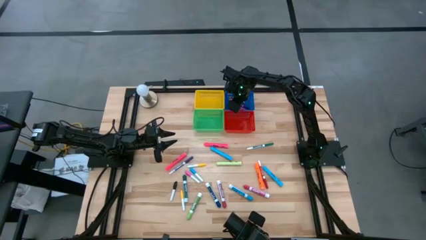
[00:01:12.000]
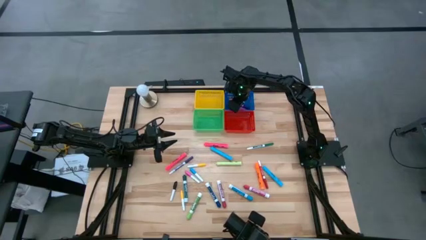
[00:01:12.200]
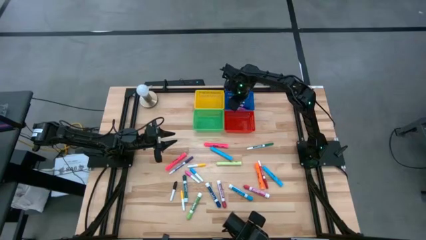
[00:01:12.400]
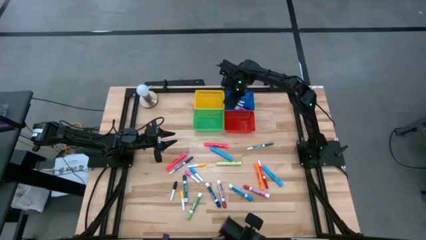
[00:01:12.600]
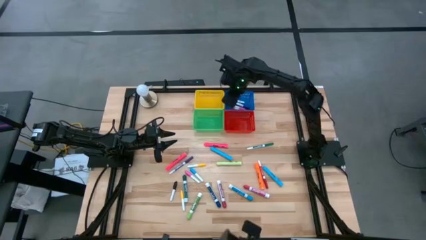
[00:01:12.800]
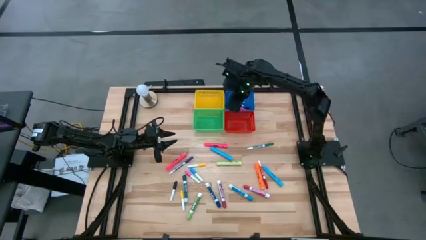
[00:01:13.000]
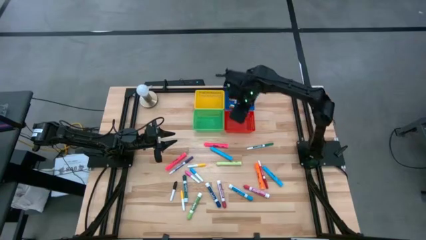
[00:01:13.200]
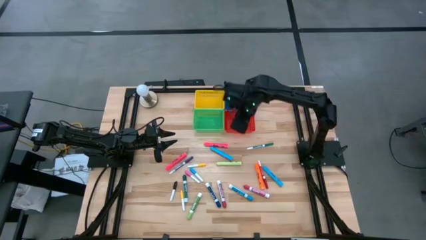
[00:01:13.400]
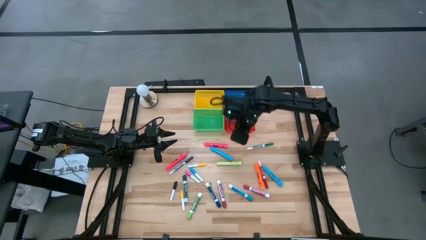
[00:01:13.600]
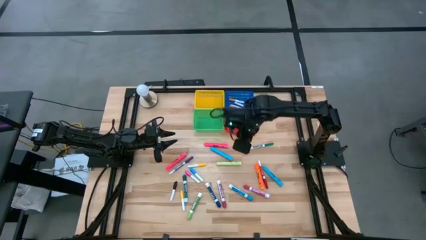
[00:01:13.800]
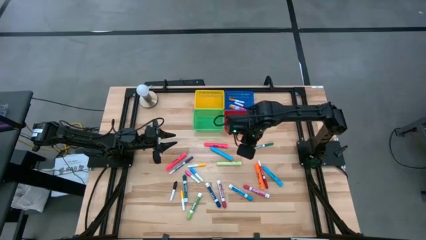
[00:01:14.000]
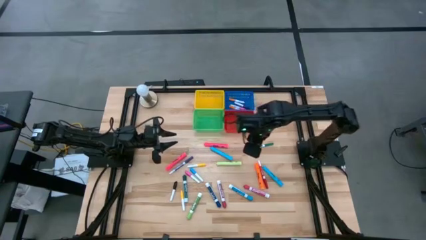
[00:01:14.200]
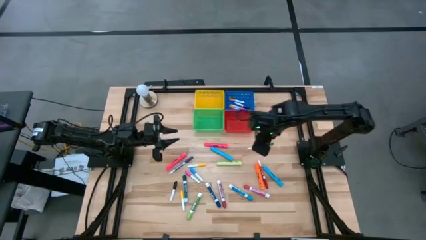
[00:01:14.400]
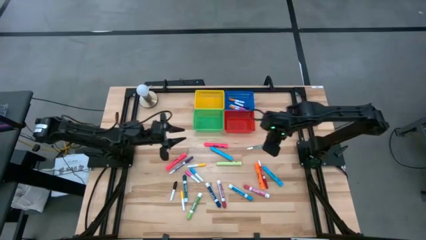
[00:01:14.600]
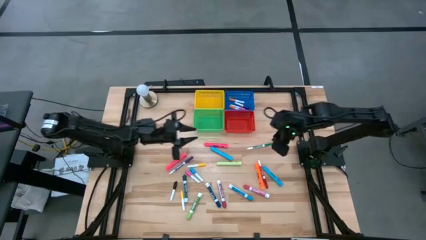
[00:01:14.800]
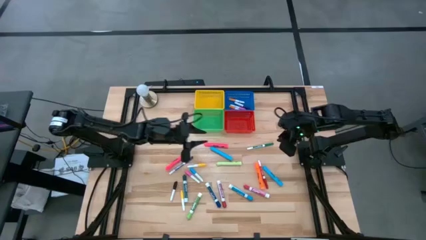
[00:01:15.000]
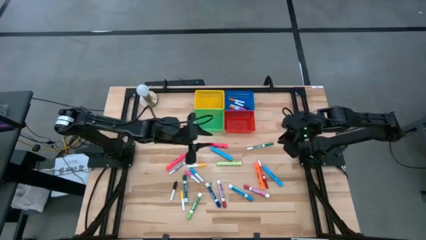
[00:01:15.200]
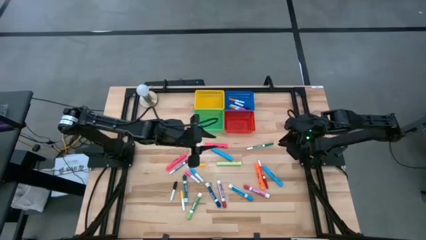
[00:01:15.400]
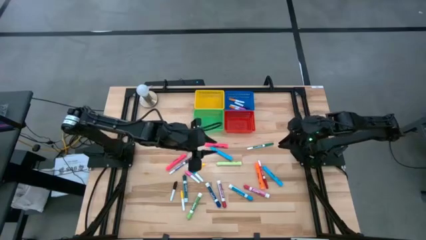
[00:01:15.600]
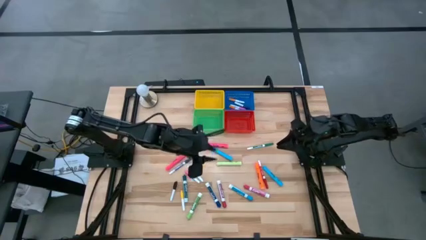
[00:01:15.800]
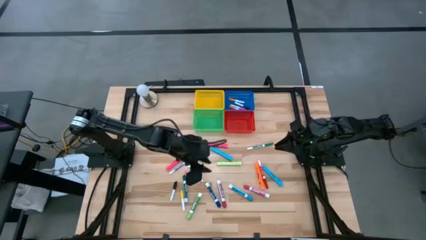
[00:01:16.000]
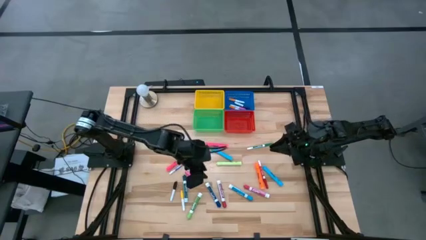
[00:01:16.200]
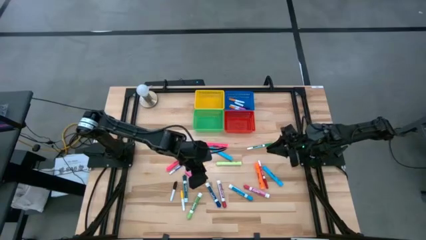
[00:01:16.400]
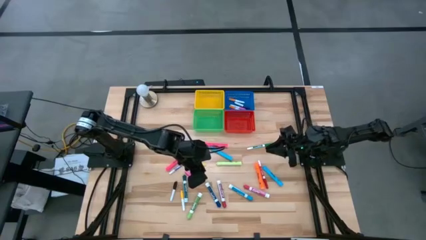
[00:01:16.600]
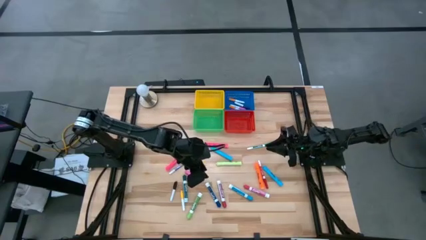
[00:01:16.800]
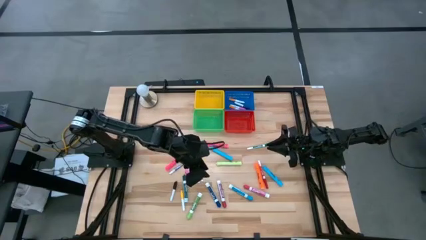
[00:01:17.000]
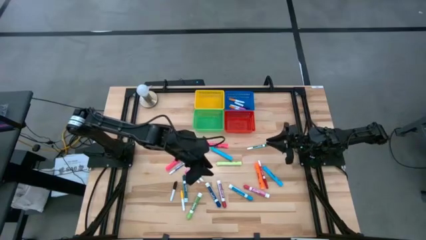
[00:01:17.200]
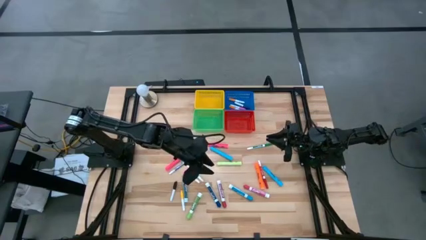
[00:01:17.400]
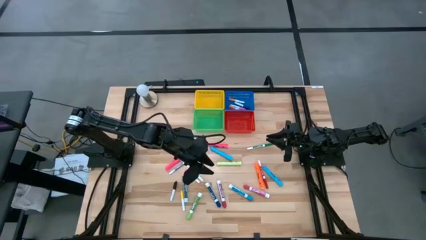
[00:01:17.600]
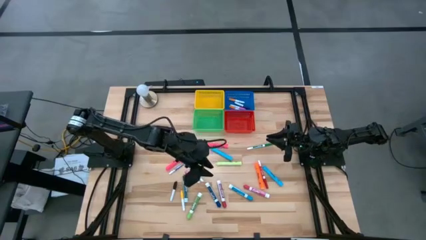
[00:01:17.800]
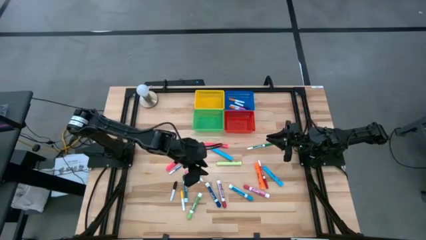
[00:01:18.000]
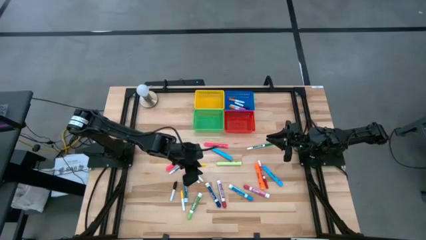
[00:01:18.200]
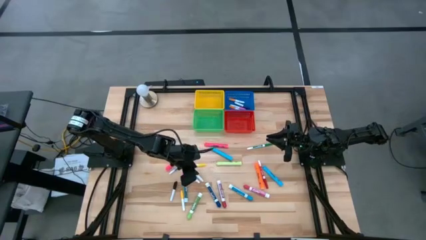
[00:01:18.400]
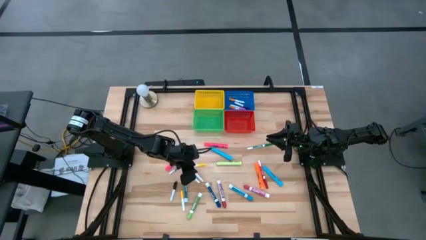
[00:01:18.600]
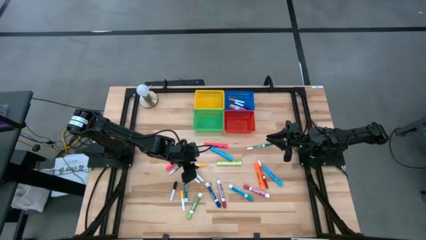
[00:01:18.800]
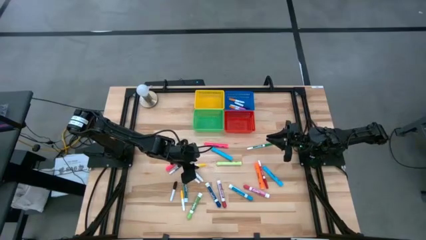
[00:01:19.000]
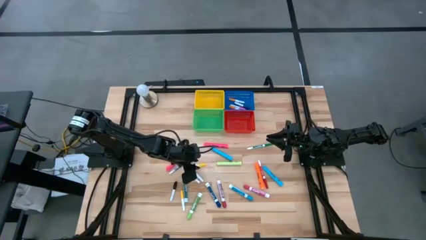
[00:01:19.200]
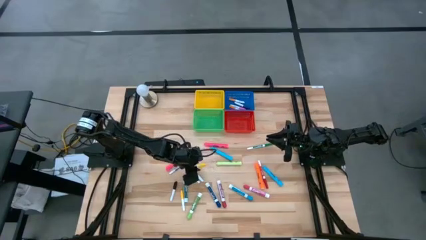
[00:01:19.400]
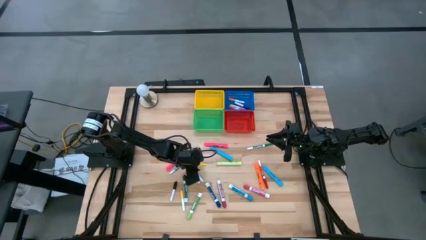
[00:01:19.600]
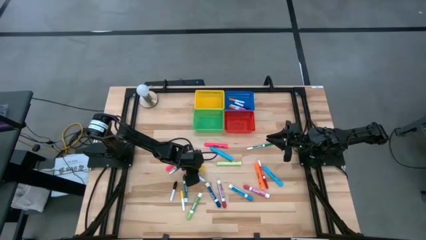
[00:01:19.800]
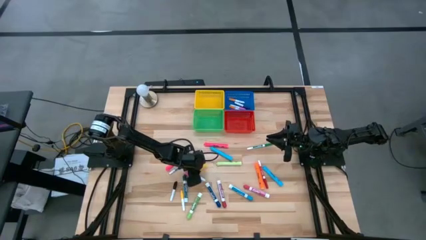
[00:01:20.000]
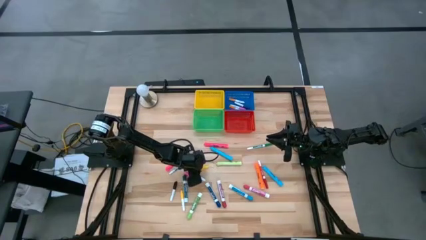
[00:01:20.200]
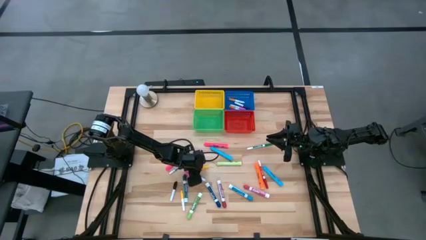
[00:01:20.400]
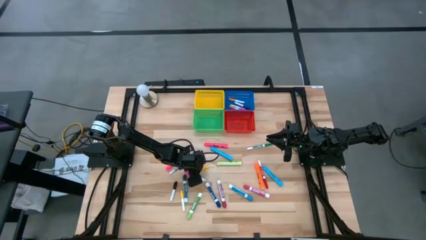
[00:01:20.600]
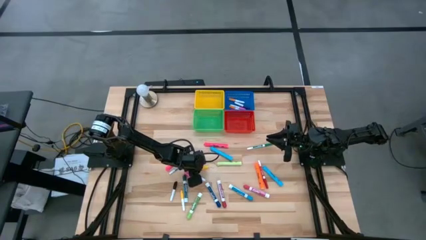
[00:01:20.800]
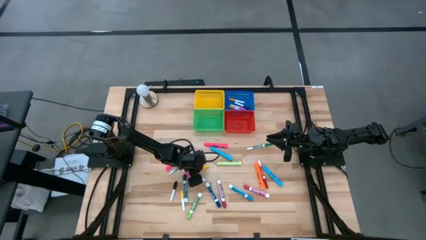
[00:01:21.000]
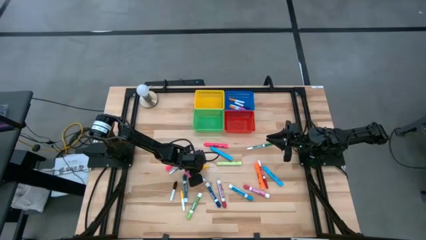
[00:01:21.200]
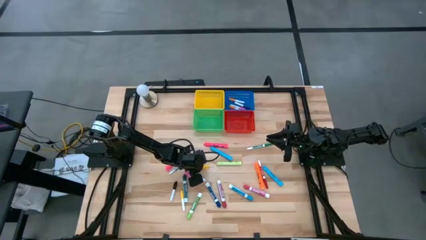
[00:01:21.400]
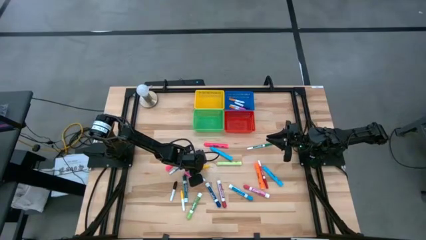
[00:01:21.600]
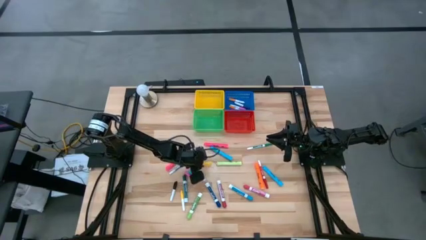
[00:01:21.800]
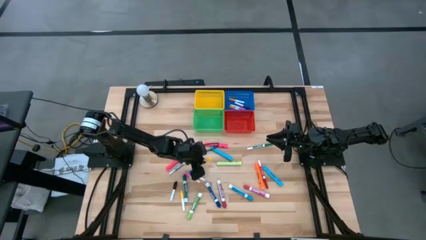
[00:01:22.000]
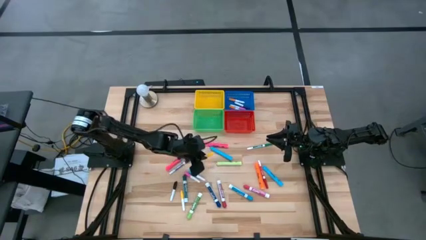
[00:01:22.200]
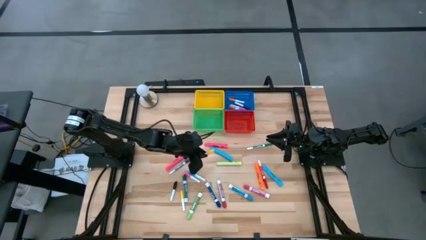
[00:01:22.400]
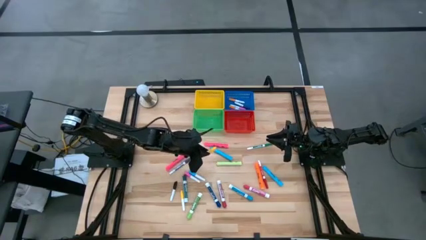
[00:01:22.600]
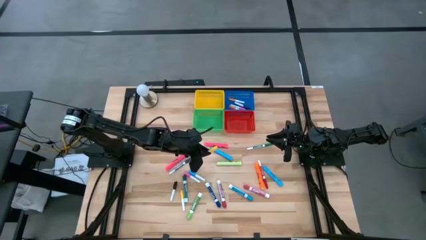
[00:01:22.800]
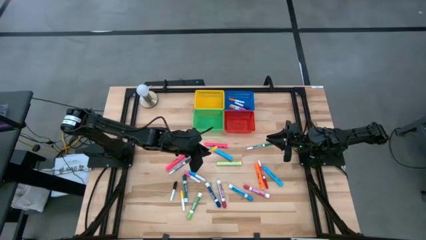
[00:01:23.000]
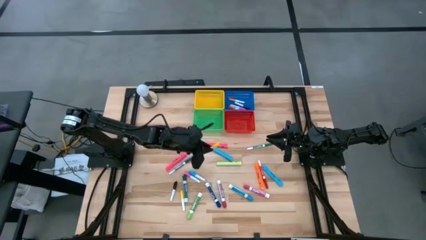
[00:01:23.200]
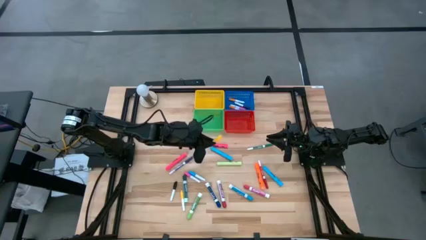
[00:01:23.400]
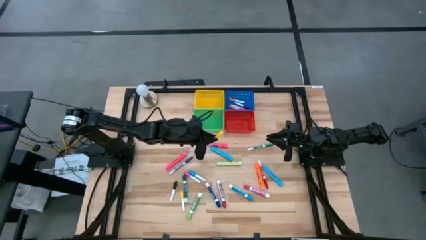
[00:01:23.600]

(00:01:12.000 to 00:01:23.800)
Task: Pick & Place Markers
Put the top small yellow highlighter pen into the blue bin
